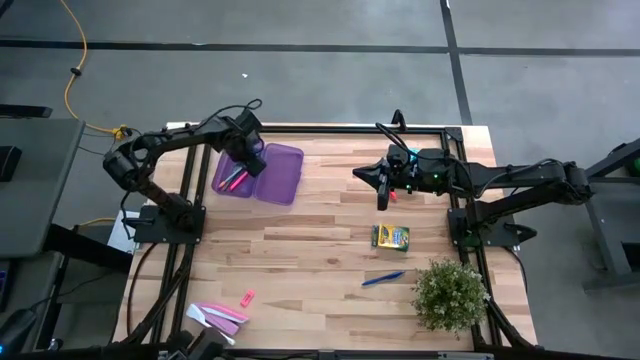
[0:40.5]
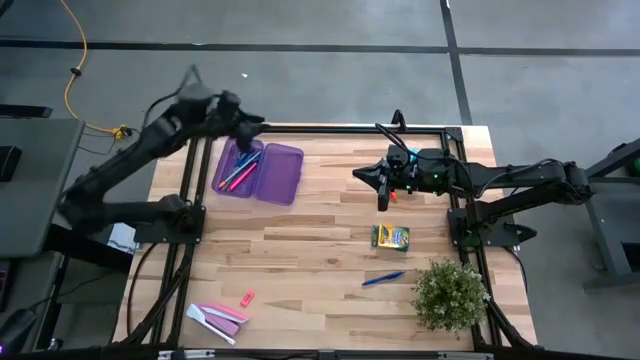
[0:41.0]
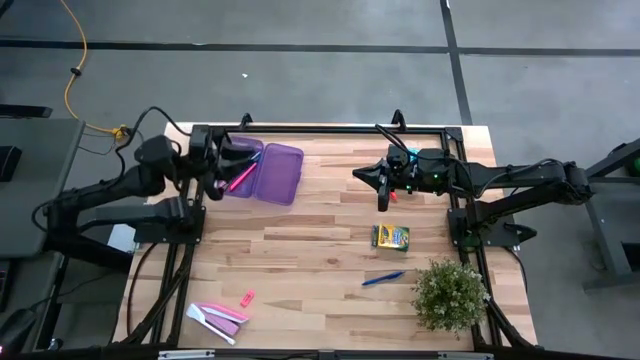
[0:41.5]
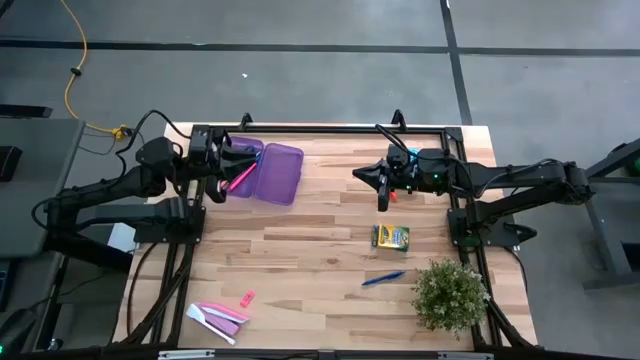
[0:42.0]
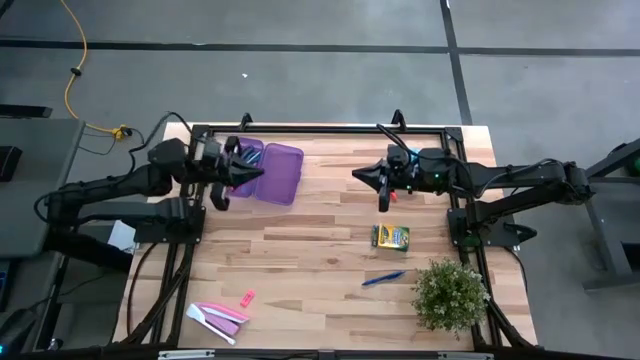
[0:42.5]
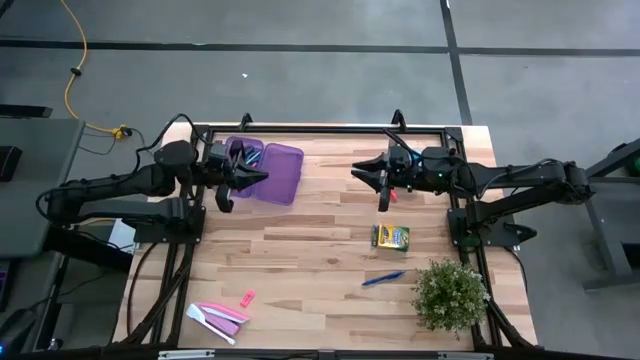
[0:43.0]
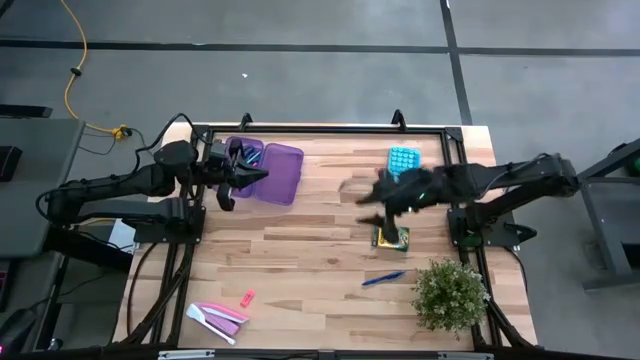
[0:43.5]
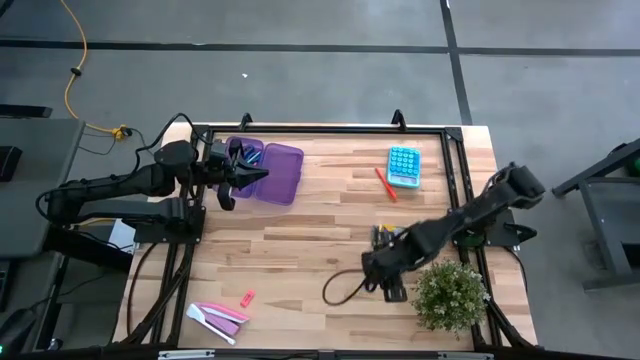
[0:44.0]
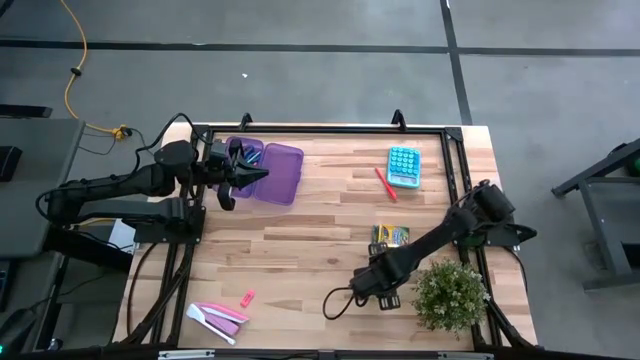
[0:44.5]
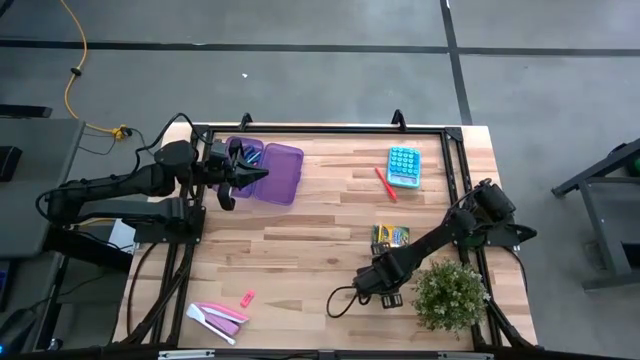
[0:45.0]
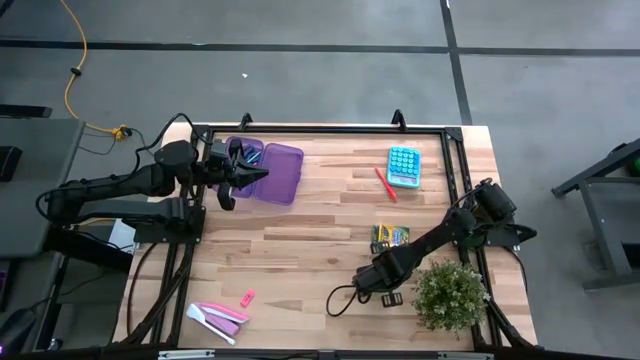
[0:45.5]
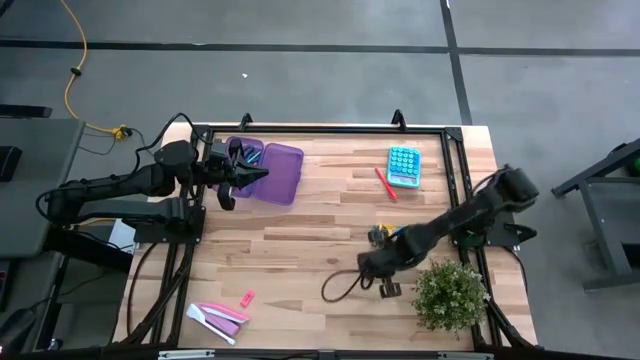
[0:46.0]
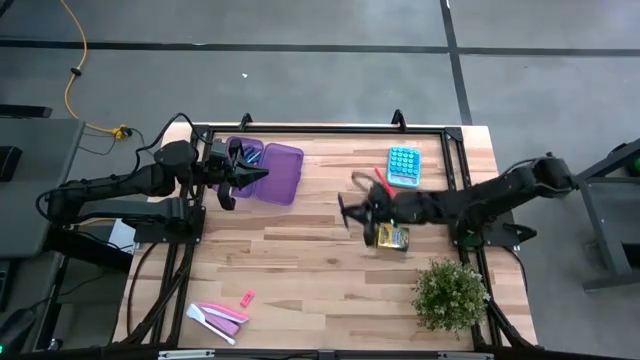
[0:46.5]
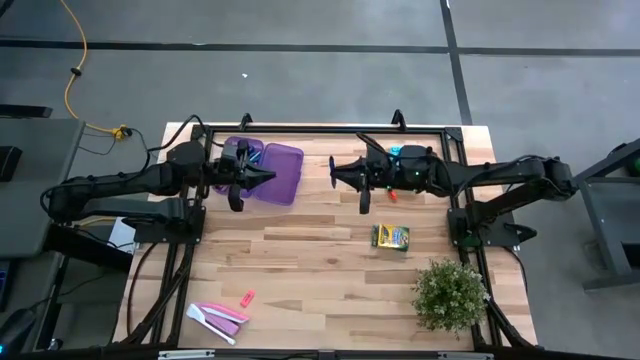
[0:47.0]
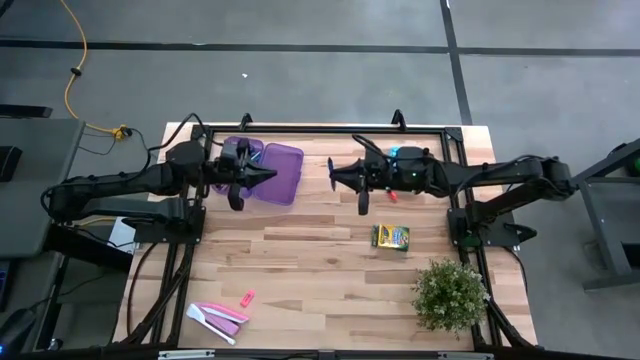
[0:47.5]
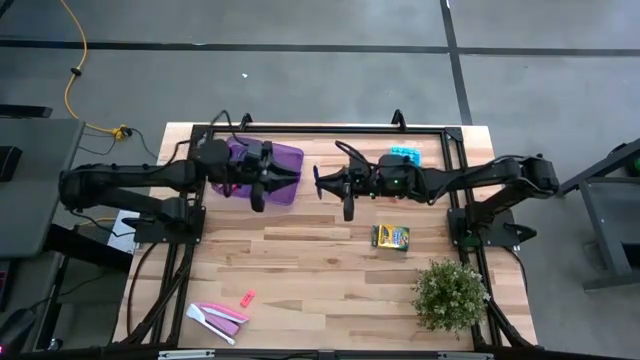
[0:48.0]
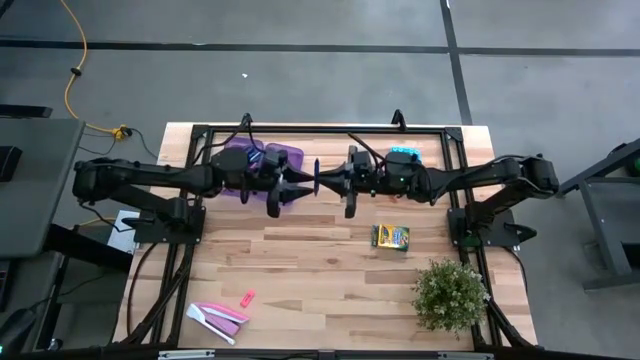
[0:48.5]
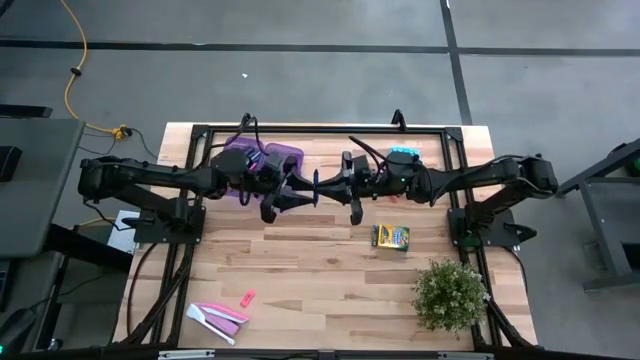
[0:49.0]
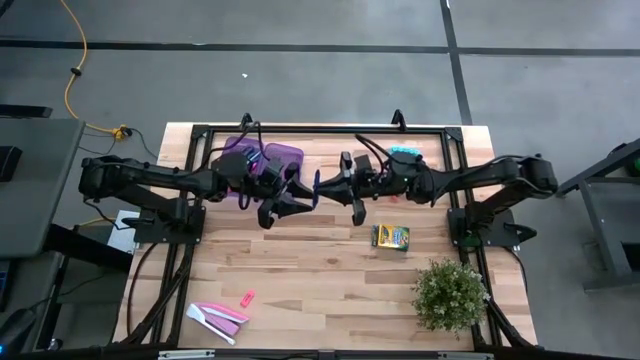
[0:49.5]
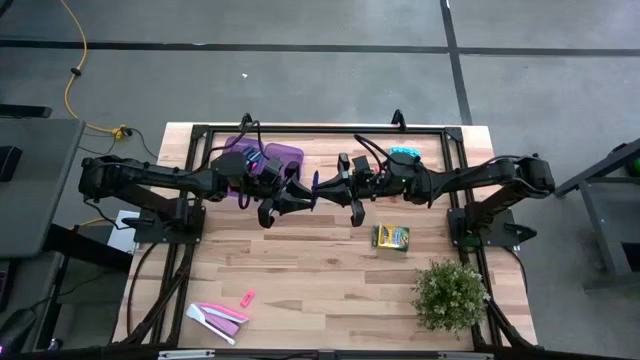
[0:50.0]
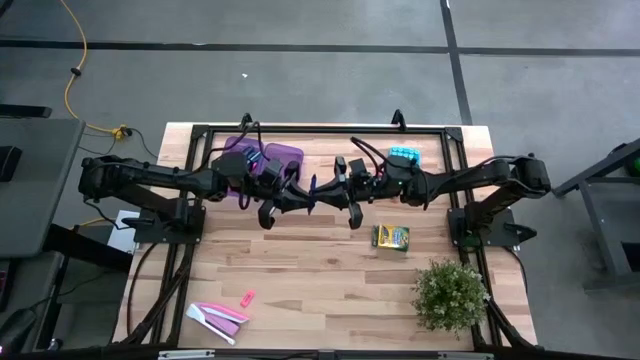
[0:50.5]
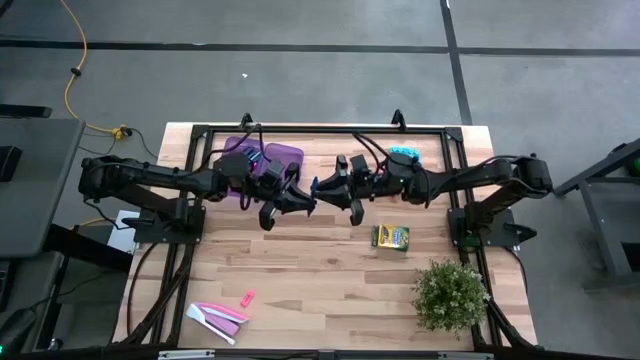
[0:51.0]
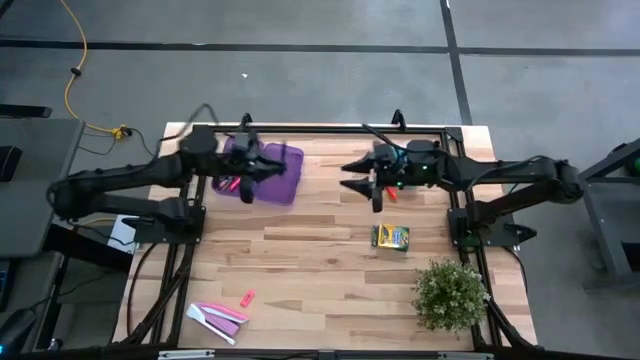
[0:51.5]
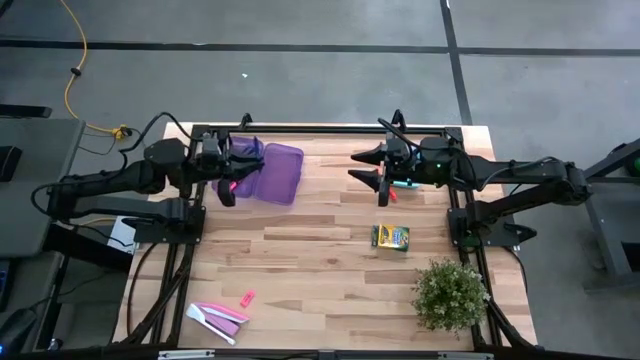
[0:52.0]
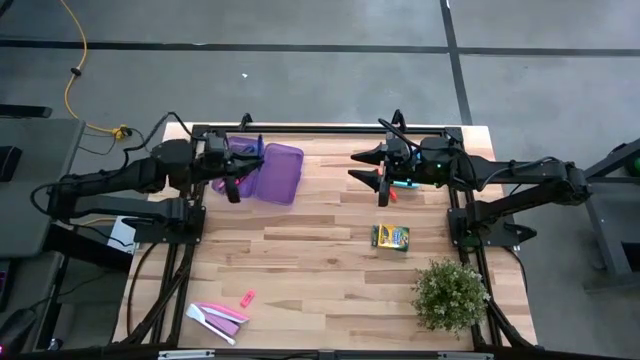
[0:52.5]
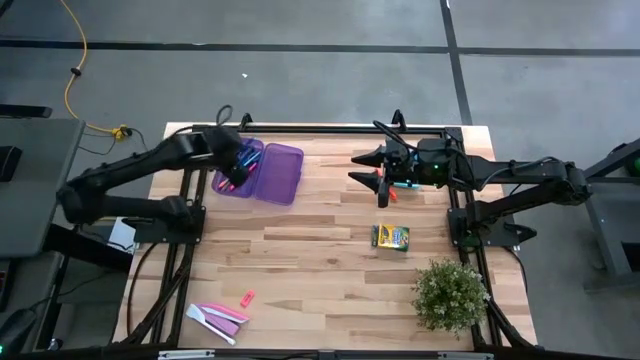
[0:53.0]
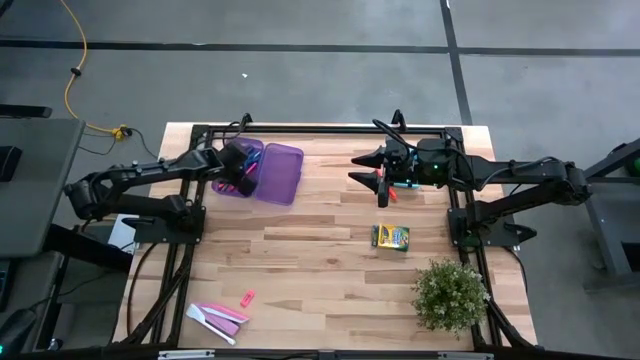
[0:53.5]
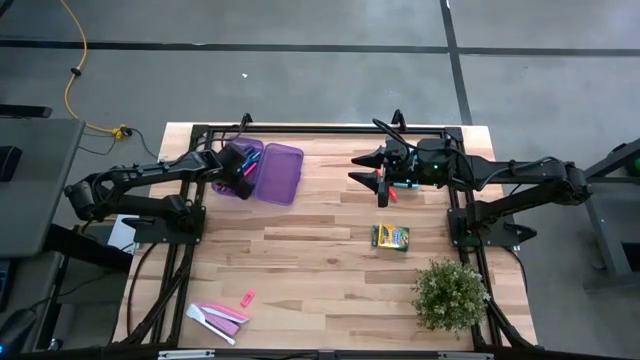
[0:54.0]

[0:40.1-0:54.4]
Task: Pack school essentials
Put the blue pen into the purple supply box

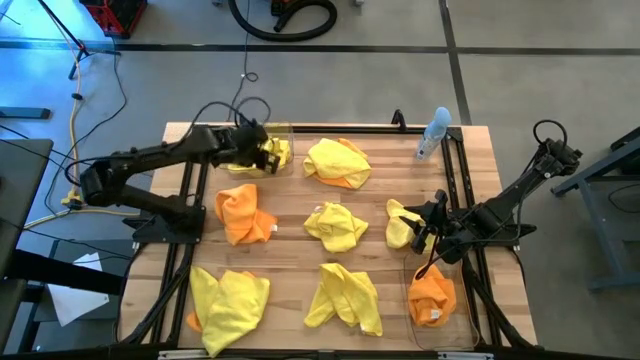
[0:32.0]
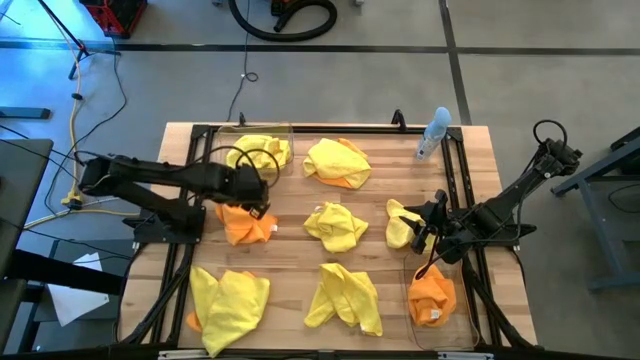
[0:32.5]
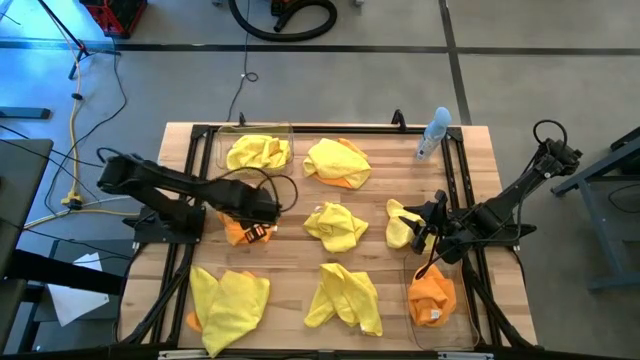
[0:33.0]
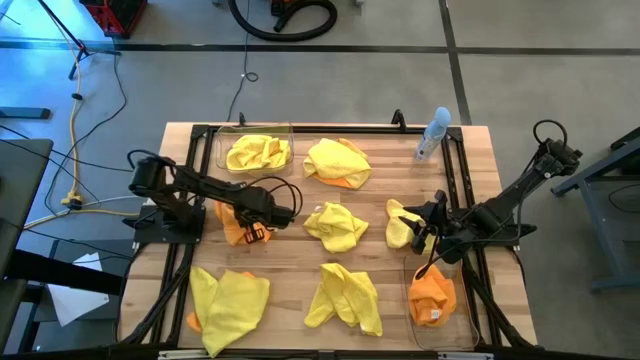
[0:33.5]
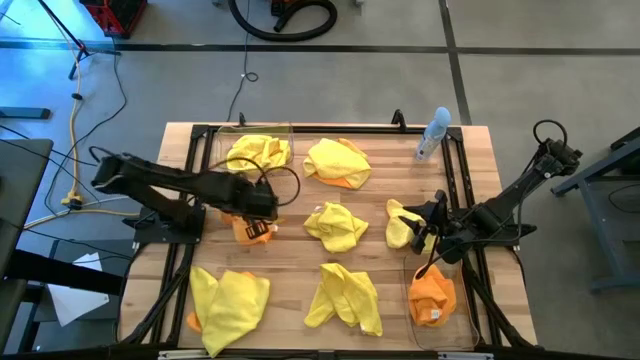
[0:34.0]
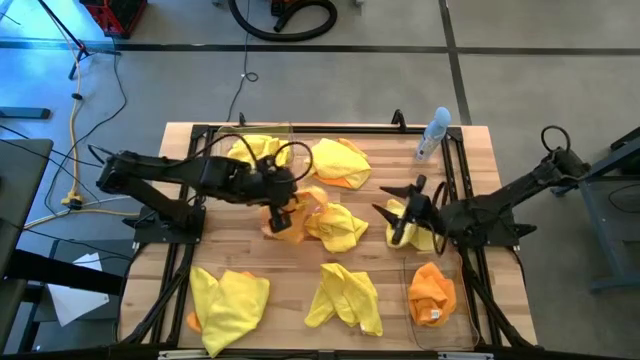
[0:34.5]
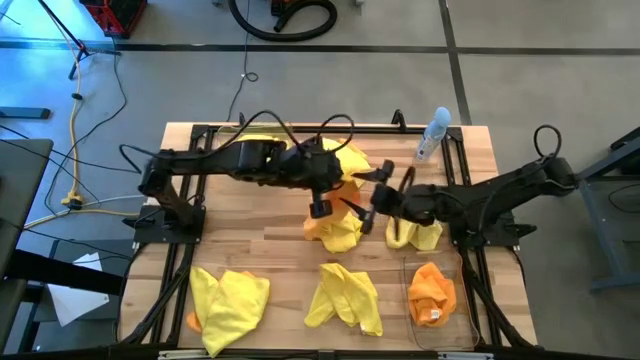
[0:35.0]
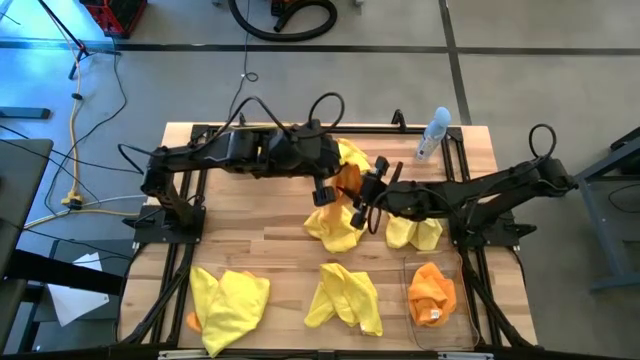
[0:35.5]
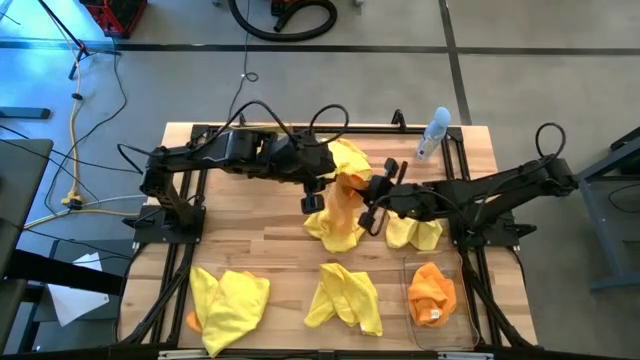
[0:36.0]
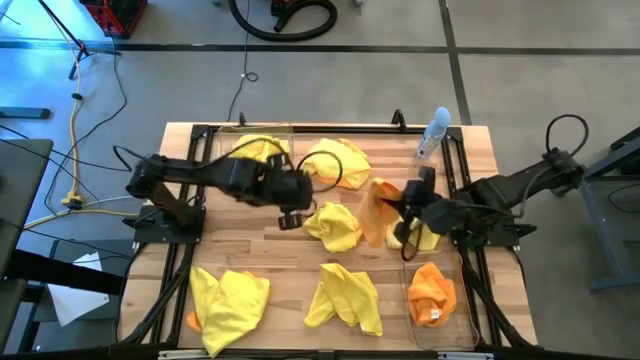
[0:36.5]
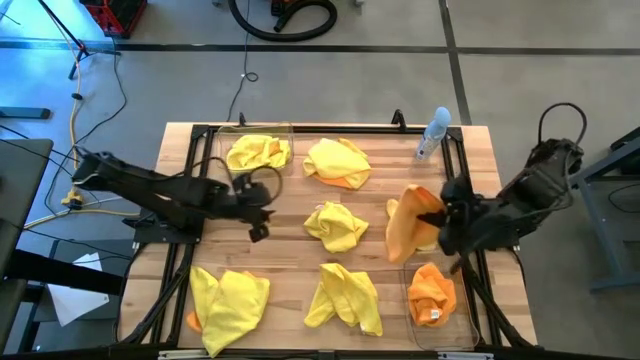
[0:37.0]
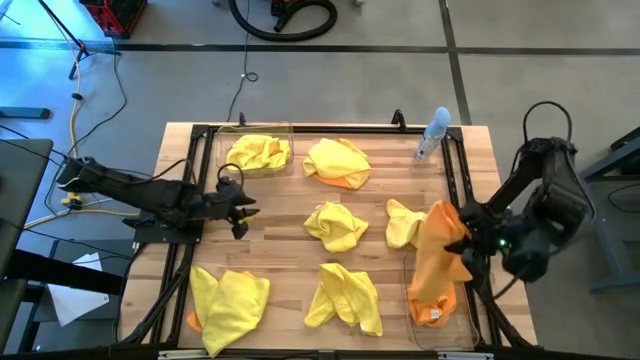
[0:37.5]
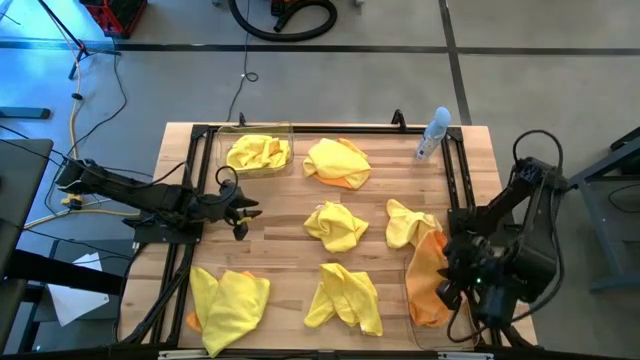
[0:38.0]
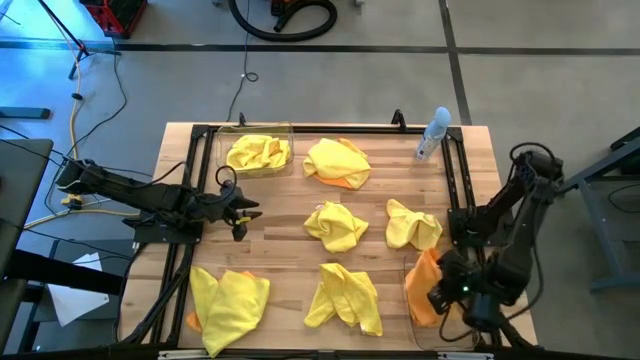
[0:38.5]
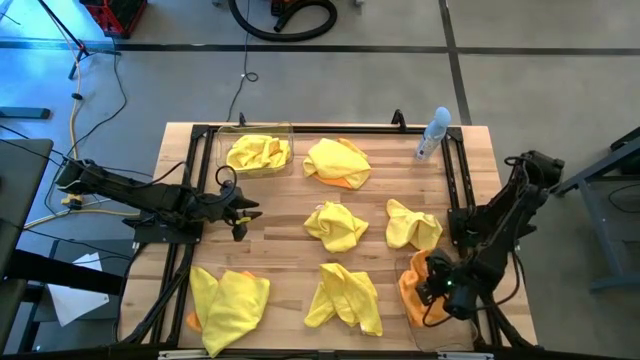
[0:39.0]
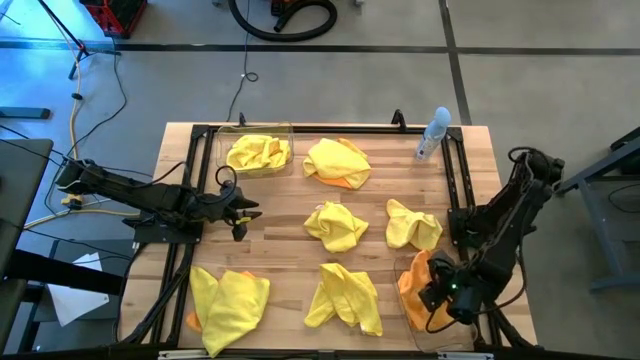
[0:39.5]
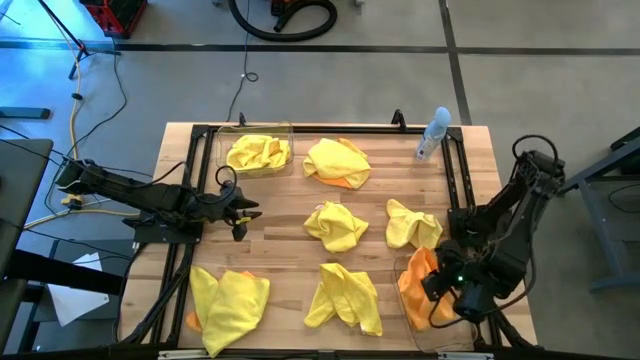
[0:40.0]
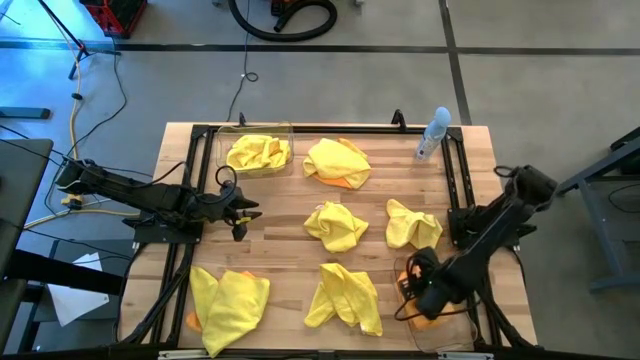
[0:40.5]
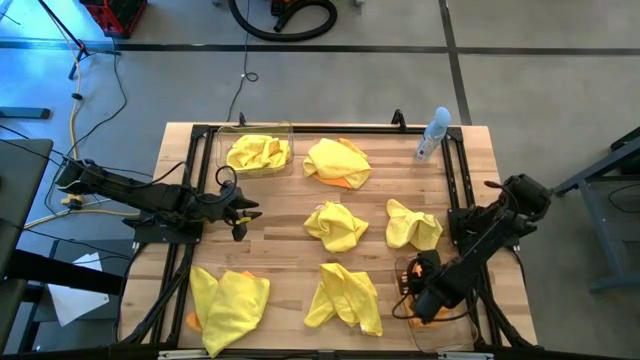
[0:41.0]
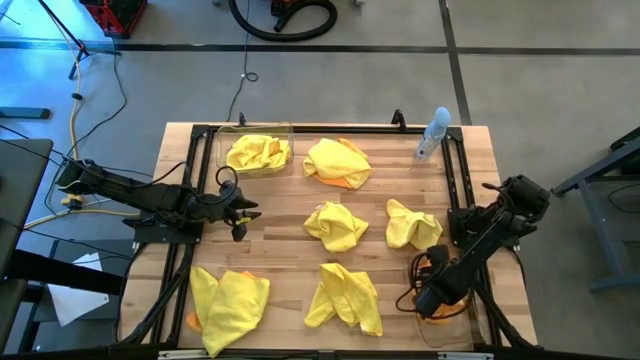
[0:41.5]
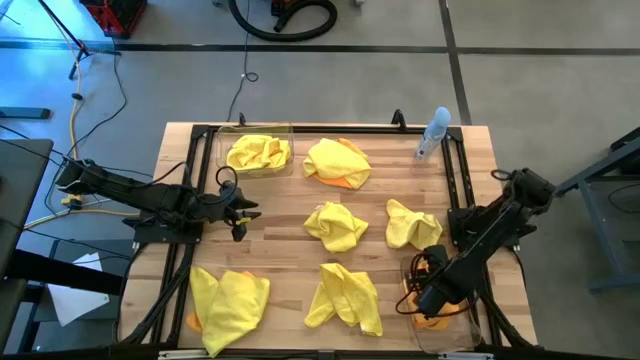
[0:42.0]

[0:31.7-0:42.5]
Task: Sort microfiber towel by color & place in baskets
Put the orange towel into the bottom transparent bin
